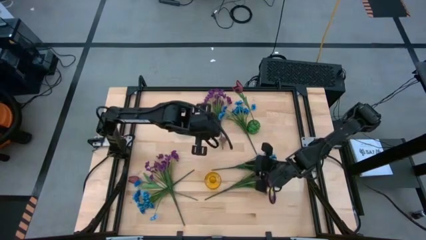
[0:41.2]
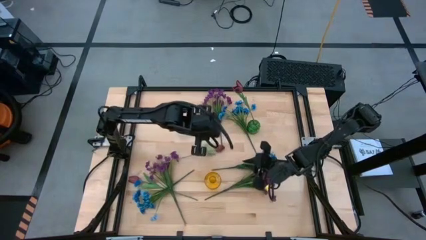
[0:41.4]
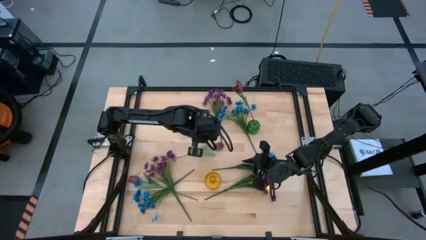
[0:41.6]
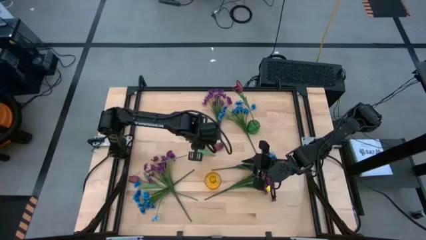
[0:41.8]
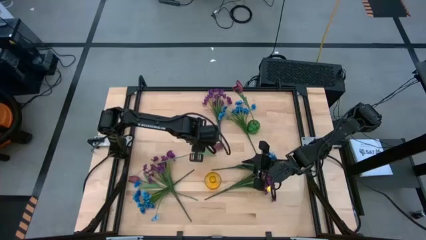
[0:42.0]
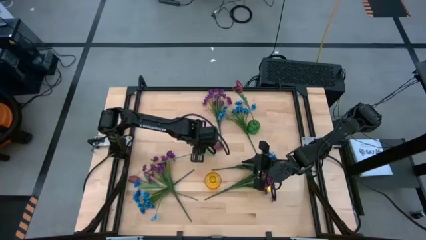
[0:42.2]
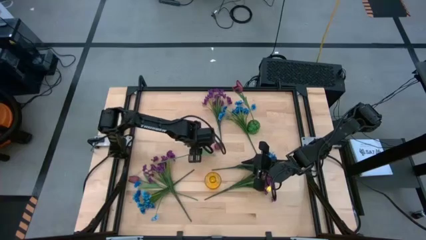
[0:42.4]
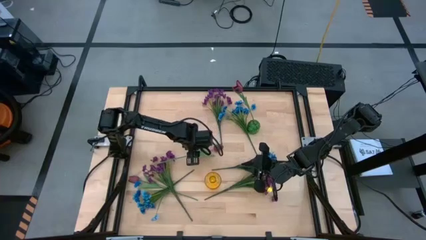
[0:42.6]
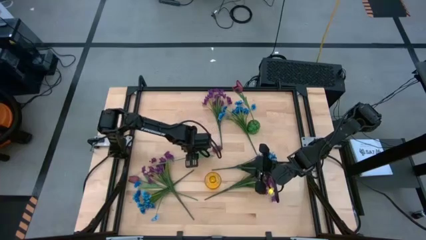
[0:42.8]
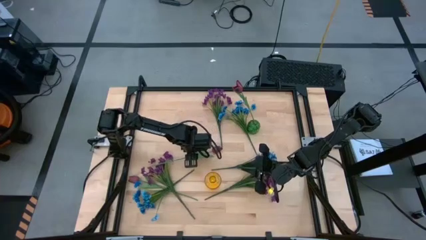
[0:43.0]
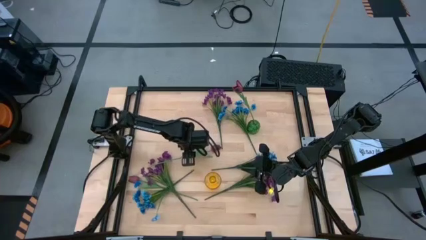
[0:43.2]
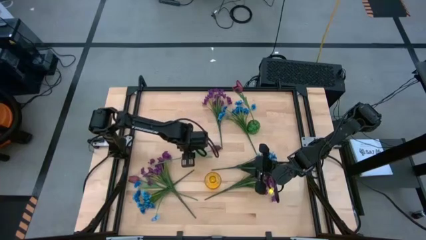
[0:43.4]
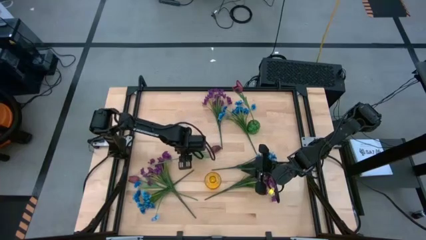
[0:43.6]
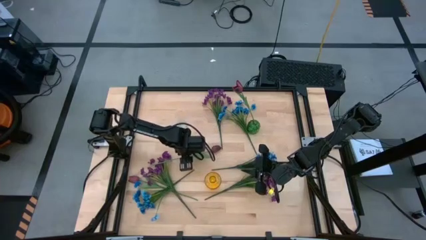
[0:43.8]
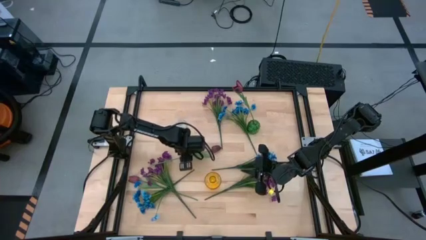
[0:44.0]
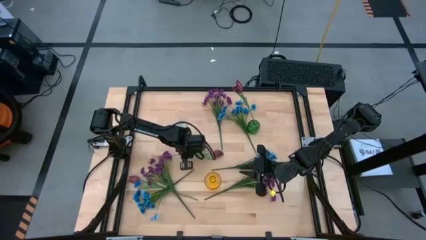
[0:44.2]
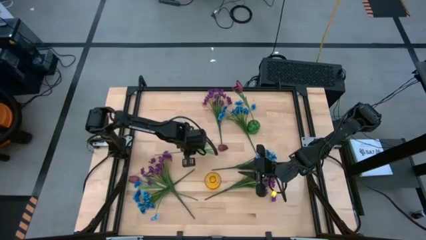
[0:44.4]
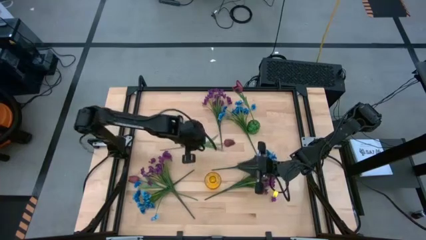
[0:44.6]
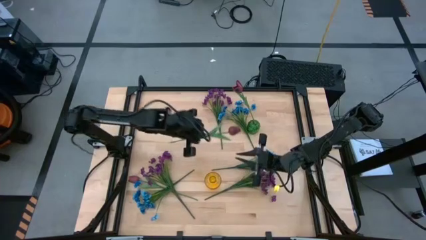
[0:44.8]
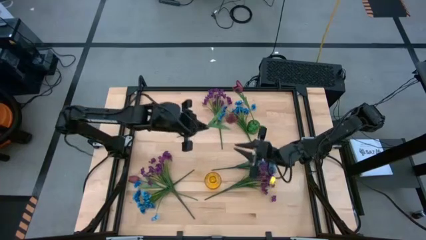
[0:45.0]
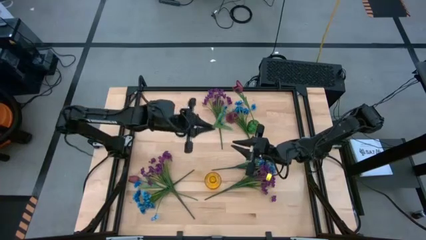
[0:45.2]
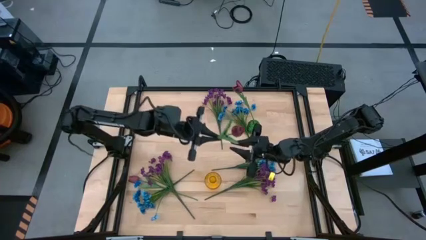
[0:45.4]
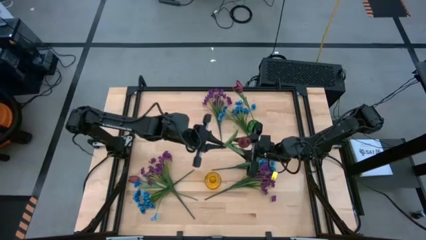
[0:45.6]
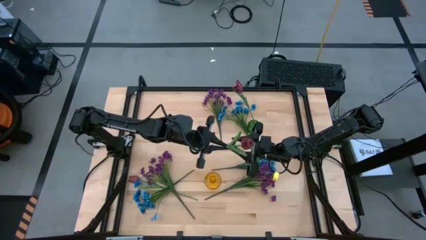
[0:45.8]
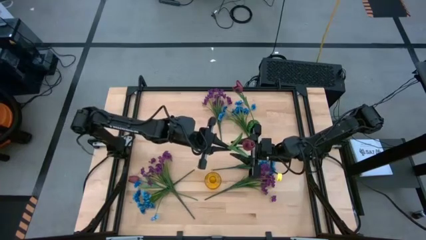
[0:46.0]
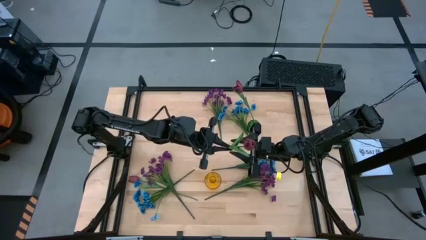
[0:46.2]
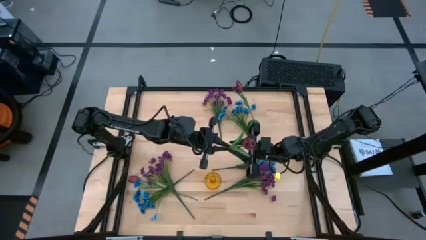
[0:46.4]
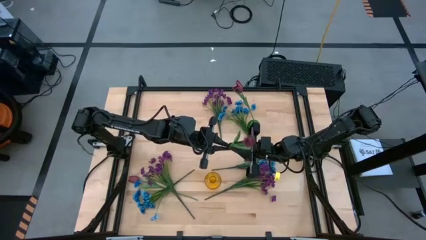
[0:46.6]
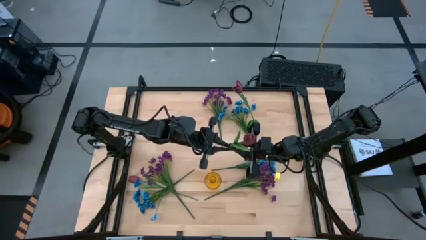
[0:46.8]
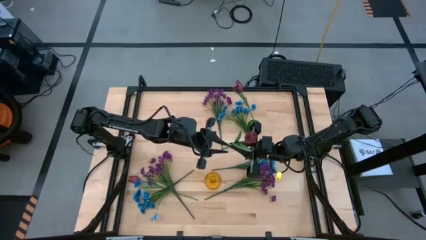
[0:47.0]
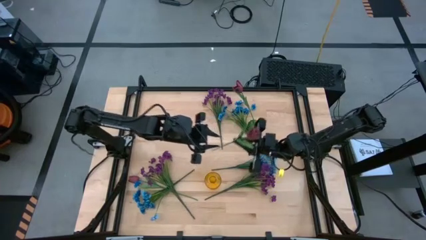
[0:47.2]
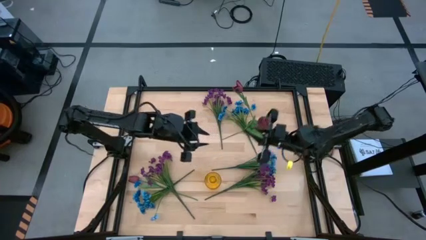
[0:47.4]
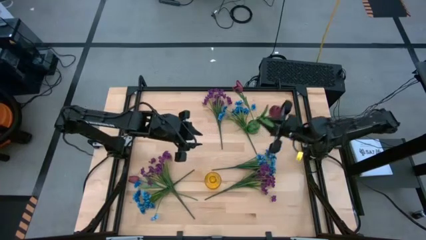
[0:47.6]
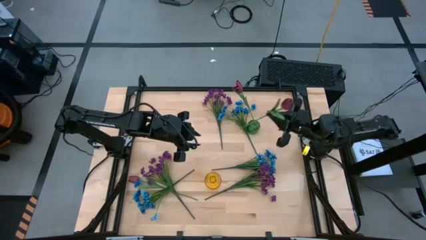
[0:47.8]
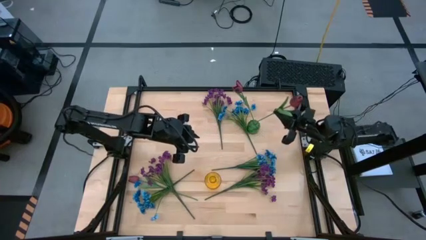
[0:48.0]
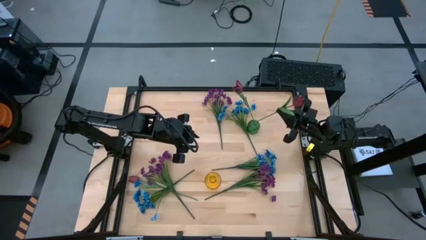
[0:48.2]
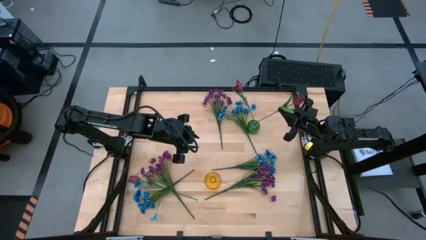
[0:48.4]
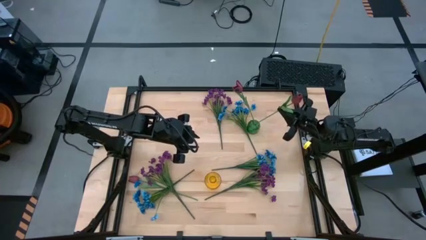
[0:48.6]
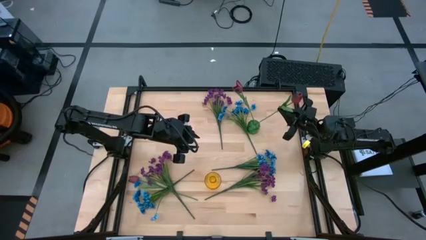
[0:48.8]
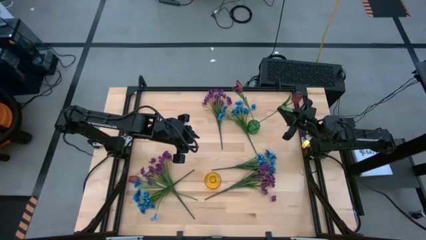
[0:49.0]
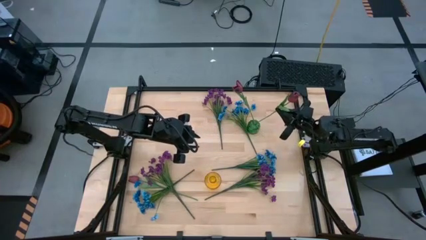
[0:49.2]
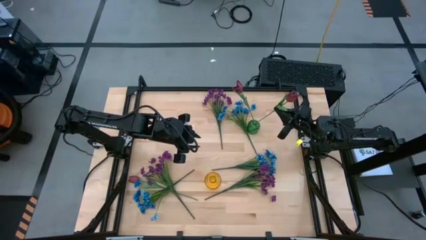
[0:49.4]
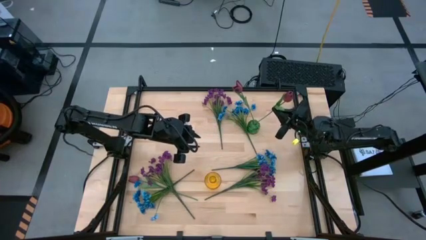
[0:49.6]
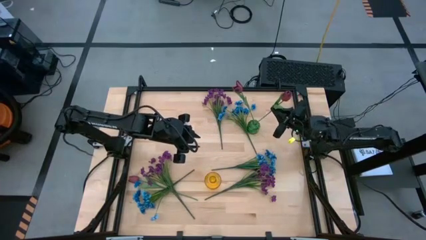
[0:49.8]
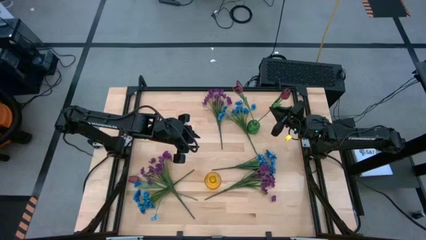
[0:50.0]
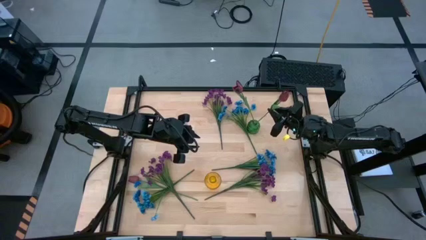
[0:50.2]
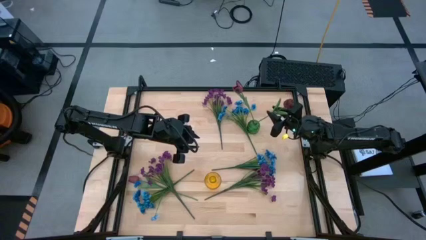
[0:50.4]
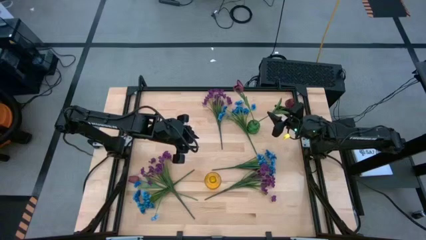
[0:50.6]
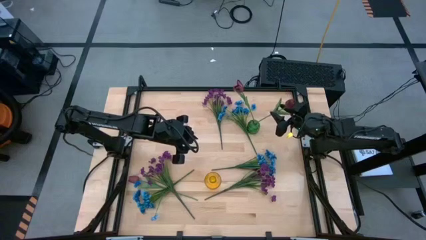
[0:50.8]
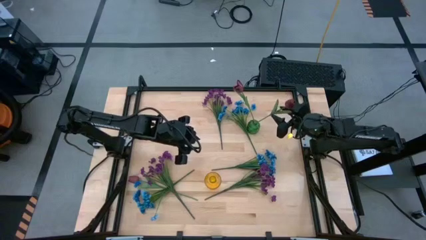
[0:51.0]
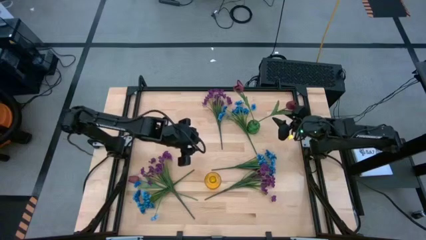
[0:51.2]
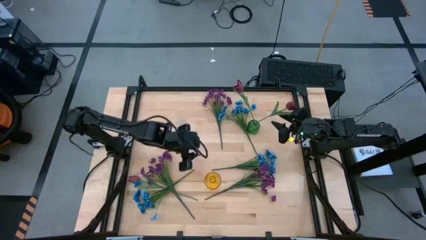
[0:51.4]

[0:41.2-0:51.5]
Task: Sort flowers into vase by color
Put the top red flower into the green vase

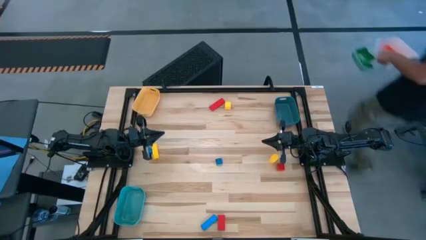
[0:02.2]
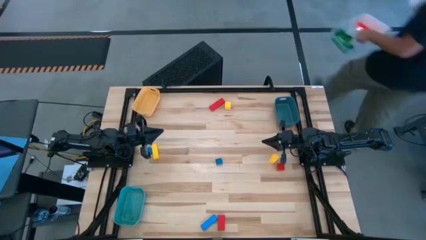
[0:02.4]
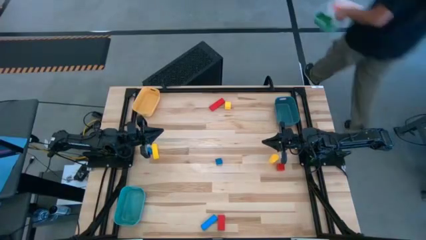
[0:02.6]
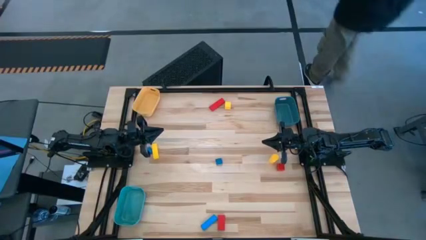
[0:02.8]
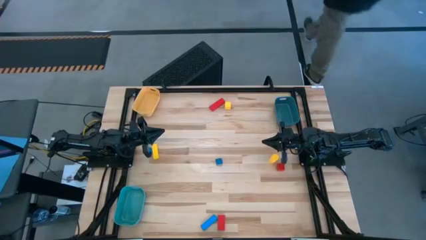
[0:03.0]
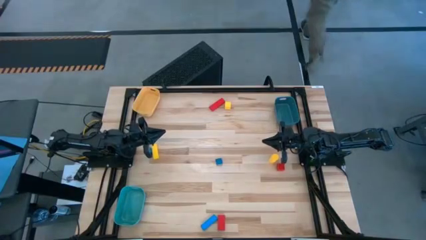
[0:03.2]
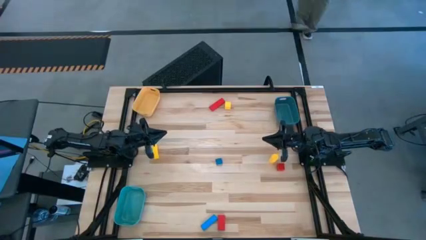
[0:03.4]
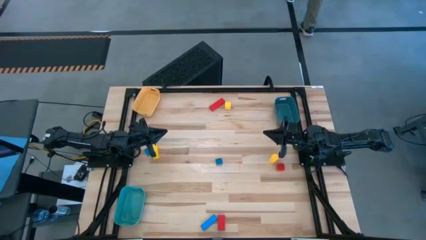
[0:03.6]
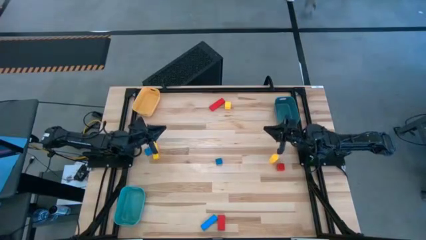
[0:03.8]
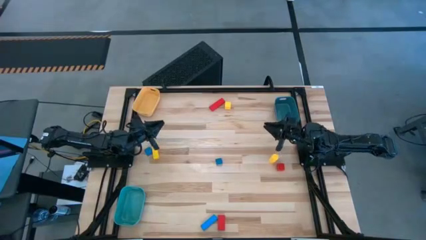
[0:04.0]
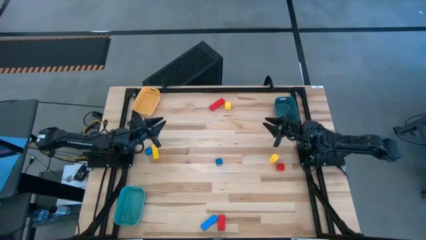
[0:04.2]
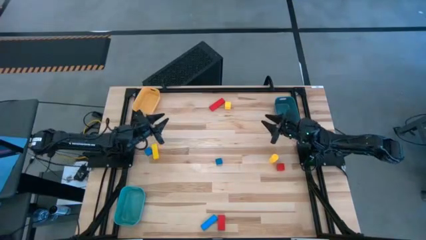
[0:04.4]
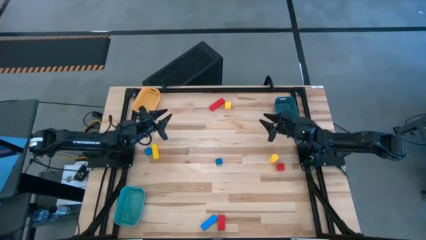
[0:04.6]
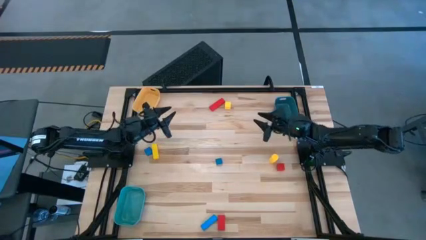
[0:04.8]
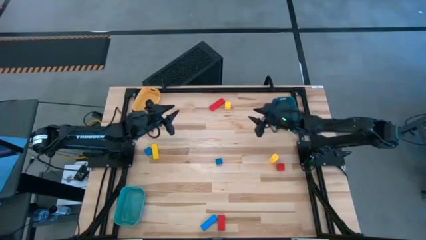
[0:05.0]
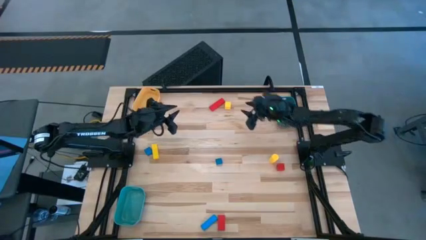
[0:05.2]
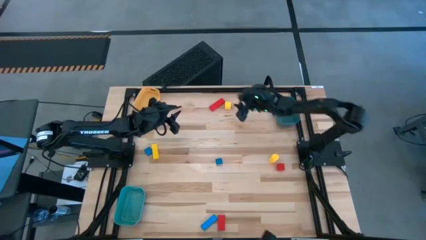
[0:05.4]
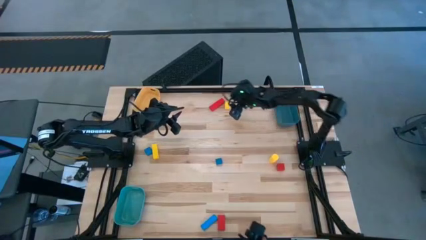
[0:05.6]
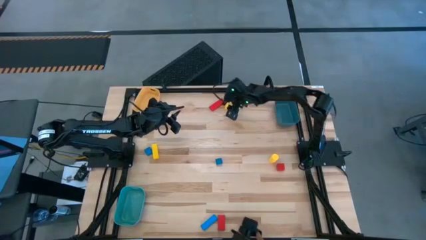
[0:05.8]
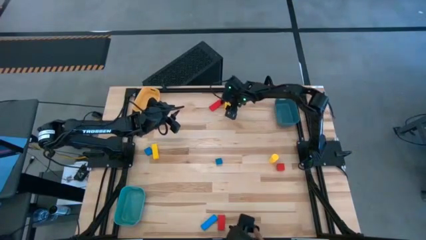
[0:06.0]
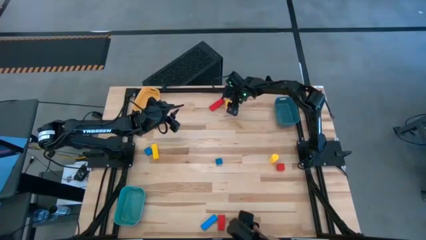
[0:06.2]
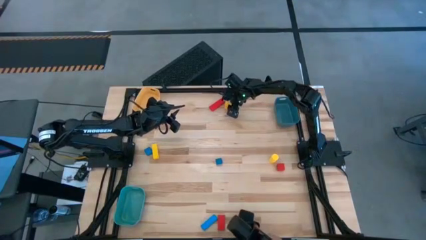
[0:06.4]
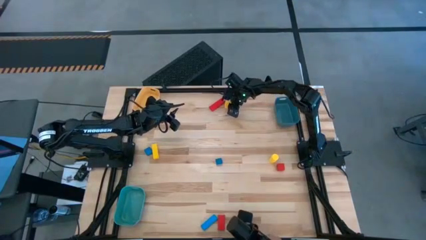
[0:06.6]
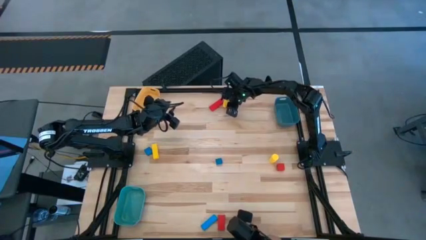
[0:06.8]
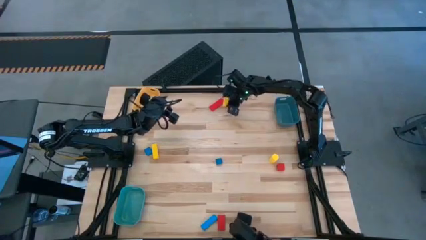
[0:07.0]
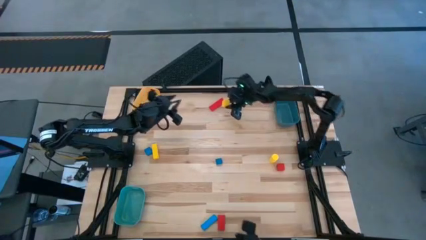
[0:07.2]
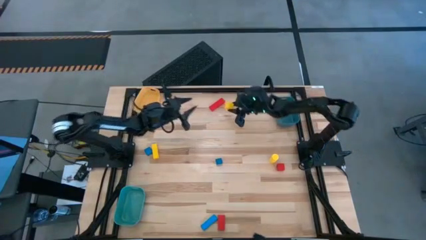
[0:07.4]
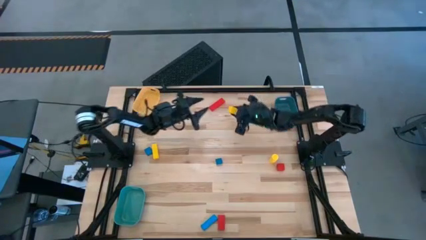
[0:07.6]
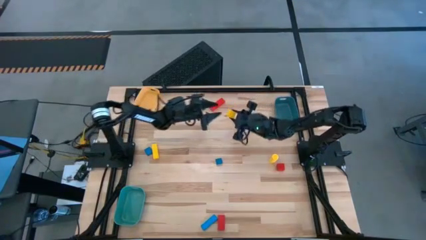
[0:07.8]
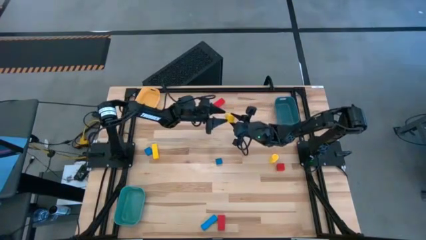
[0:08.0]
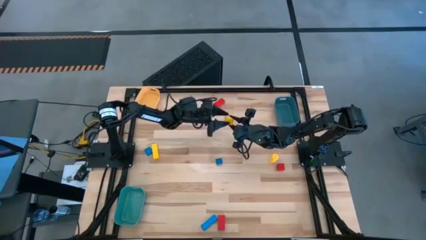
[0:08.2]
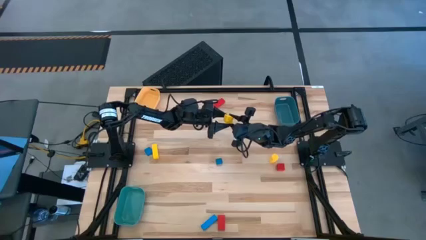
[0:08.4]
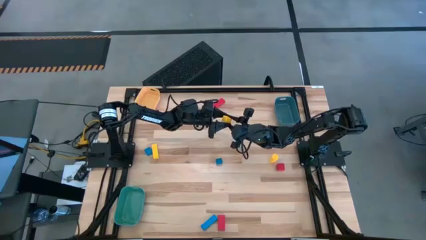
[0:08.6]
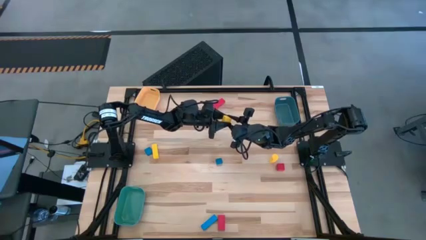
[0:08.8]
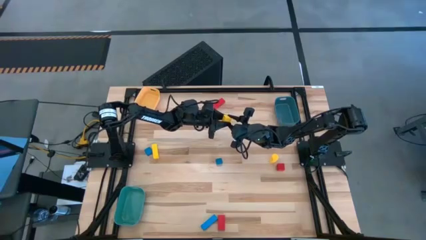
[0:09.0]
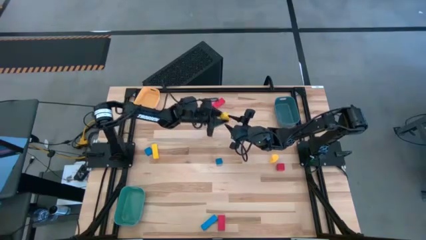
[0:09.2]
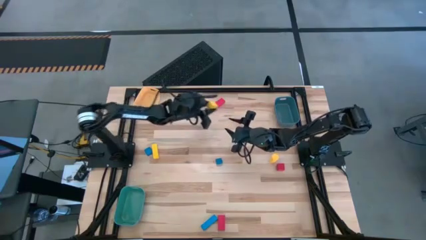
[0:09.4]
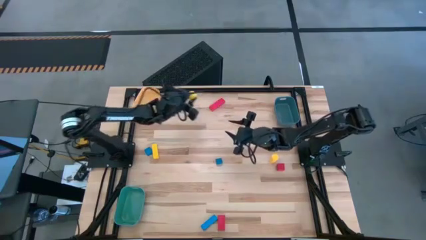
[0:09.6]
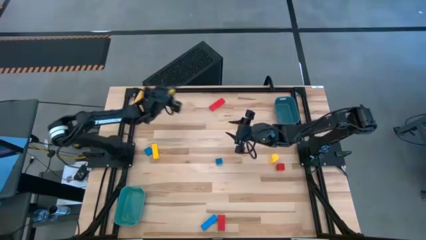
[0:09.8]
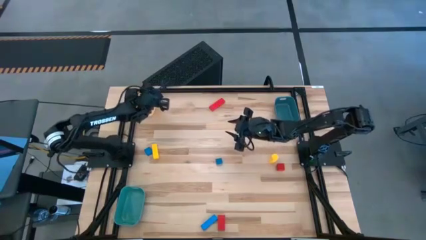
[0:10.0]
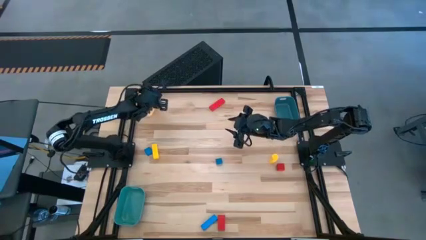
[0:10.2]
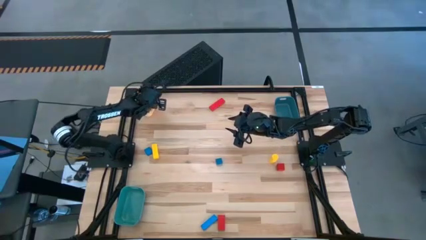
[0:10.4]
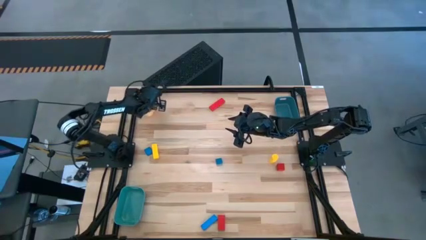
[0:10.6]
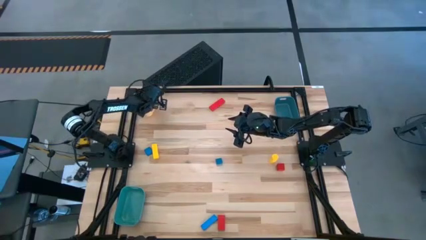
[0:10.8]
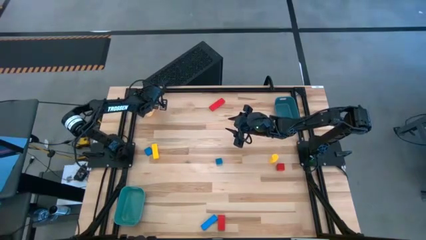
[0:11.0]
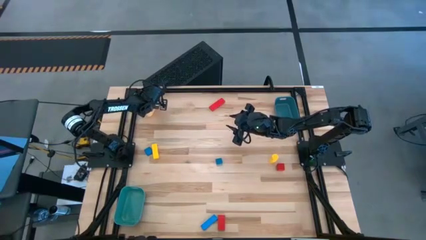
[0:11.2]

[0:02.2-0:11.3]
Task: Sort & place blocks by color
Put the top center yellow block into the yellow bin
